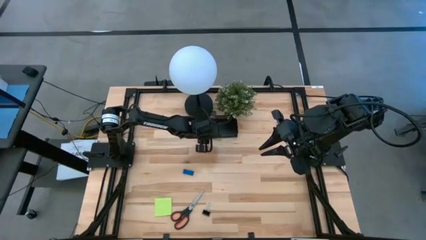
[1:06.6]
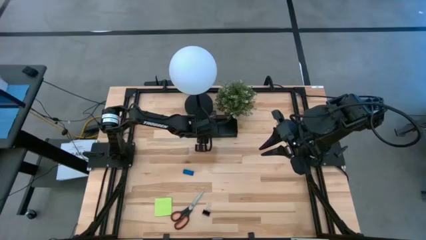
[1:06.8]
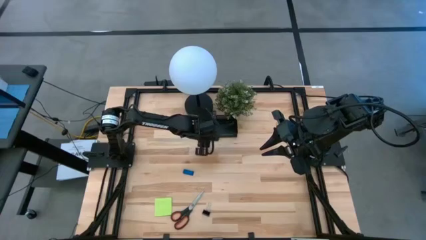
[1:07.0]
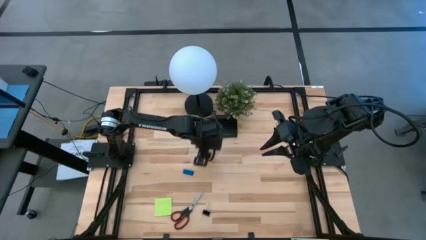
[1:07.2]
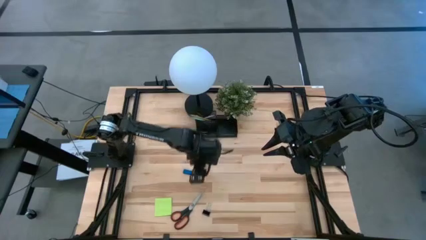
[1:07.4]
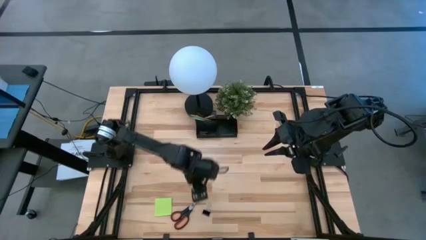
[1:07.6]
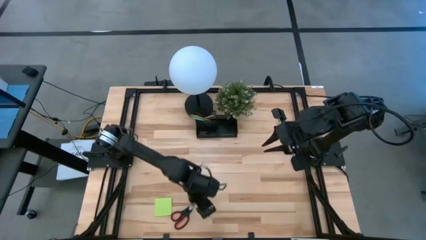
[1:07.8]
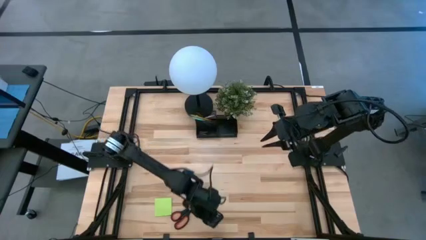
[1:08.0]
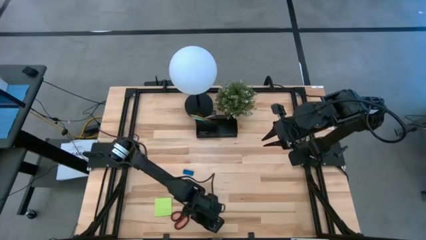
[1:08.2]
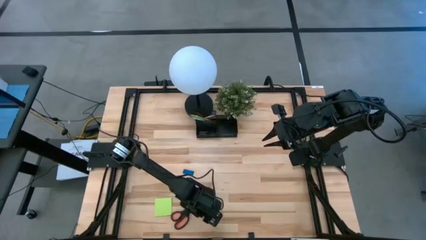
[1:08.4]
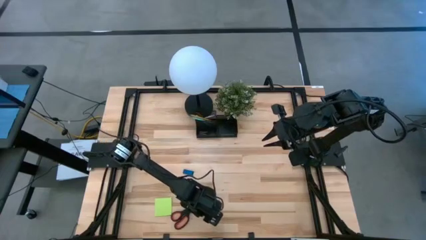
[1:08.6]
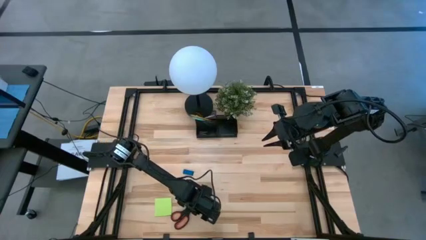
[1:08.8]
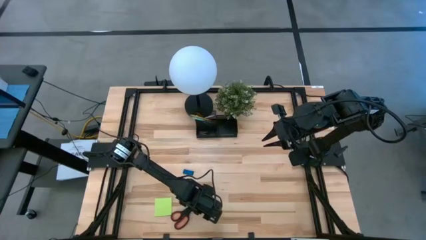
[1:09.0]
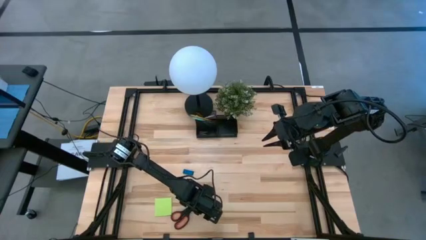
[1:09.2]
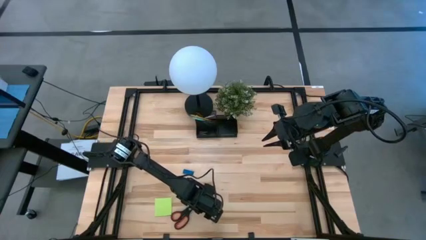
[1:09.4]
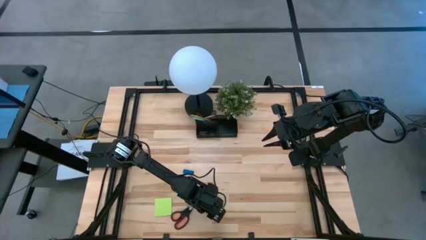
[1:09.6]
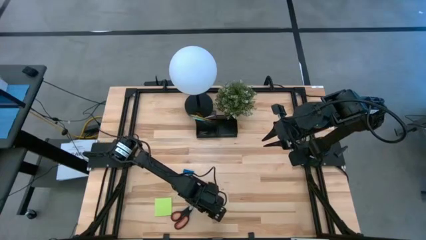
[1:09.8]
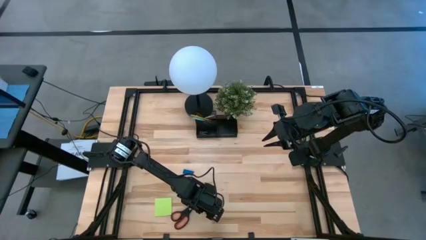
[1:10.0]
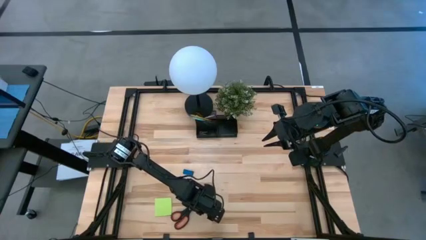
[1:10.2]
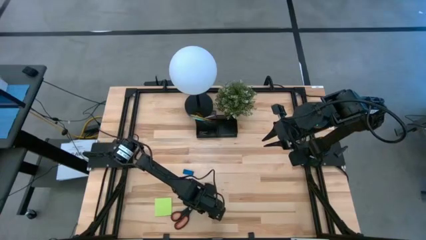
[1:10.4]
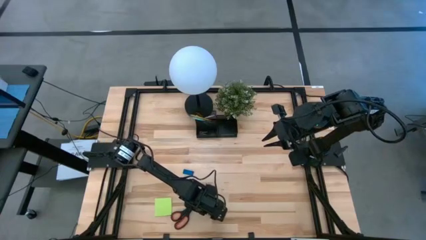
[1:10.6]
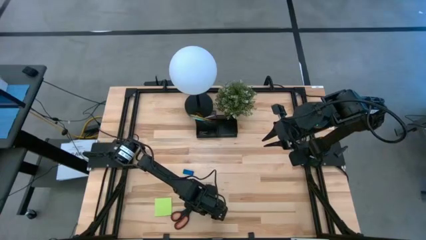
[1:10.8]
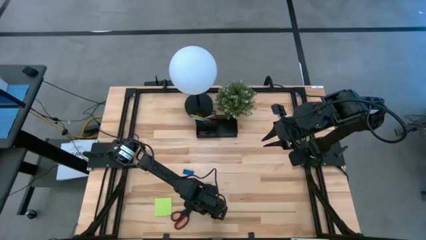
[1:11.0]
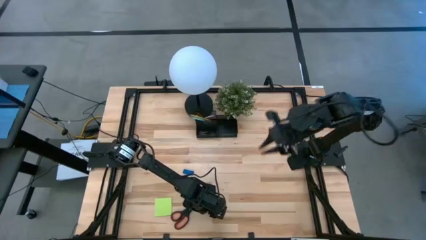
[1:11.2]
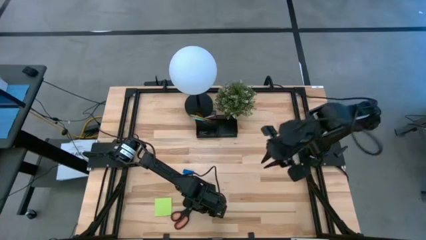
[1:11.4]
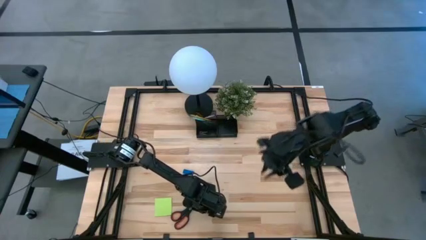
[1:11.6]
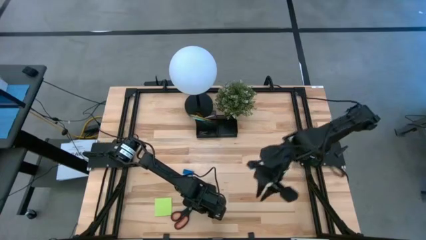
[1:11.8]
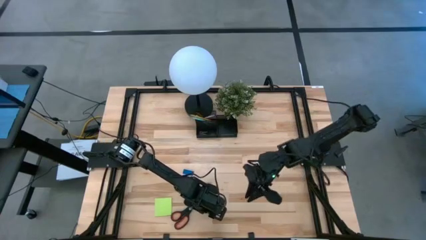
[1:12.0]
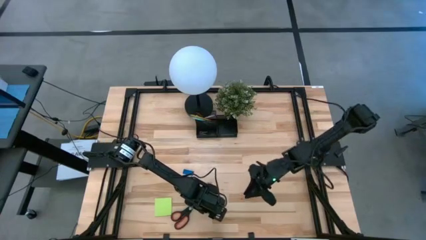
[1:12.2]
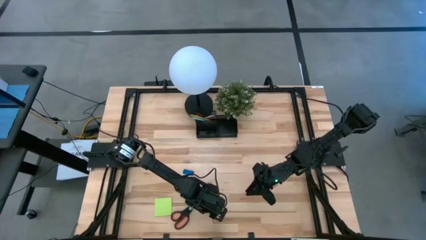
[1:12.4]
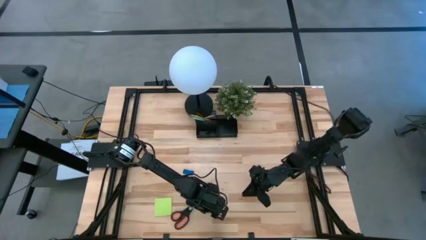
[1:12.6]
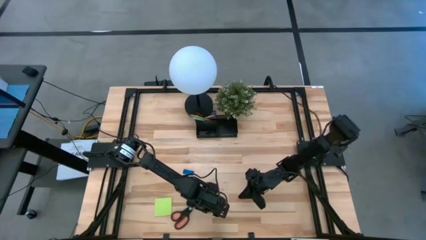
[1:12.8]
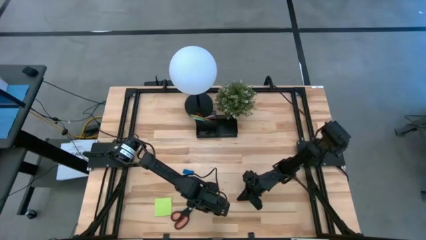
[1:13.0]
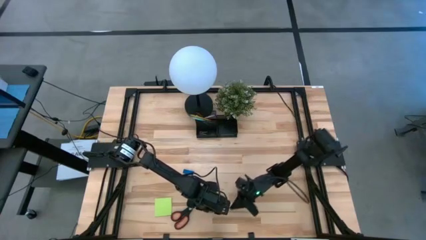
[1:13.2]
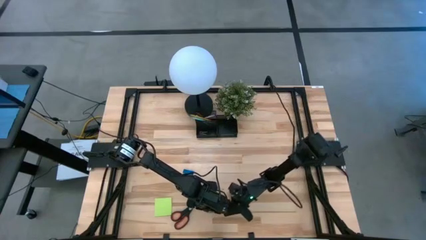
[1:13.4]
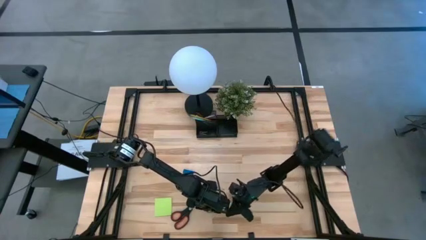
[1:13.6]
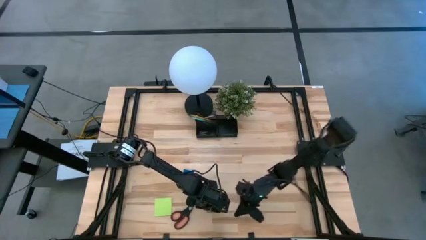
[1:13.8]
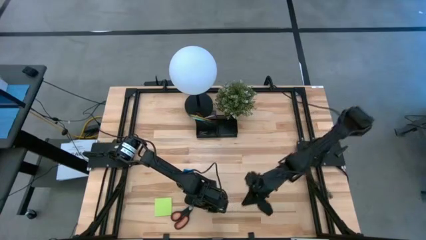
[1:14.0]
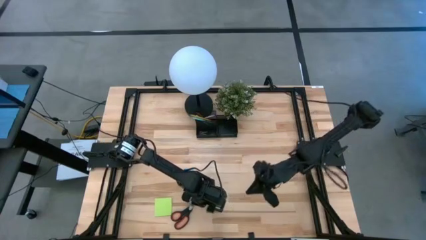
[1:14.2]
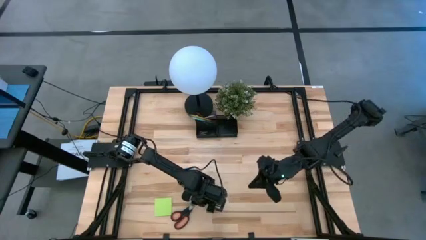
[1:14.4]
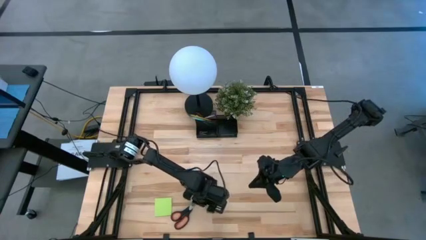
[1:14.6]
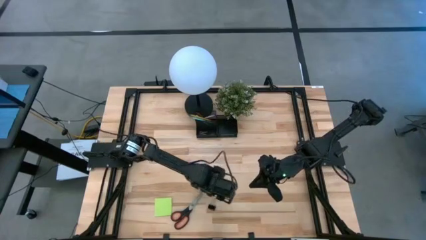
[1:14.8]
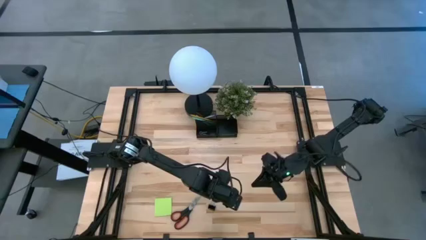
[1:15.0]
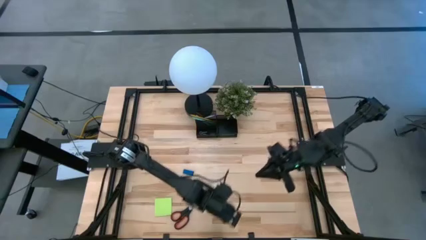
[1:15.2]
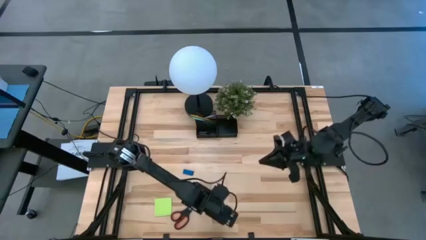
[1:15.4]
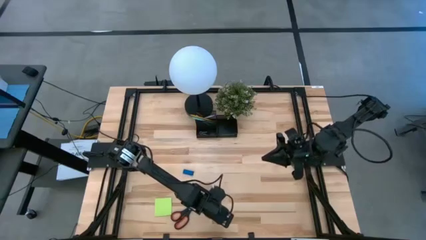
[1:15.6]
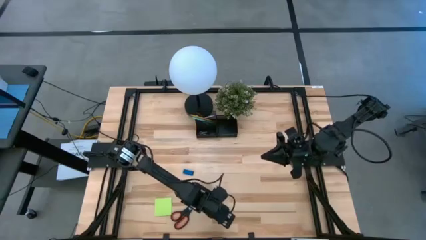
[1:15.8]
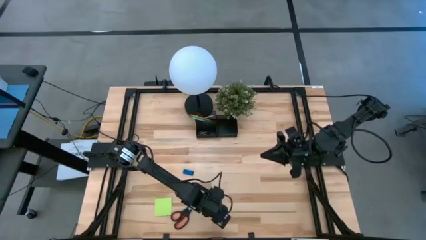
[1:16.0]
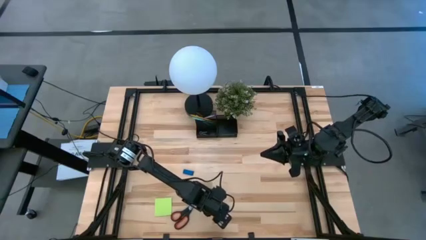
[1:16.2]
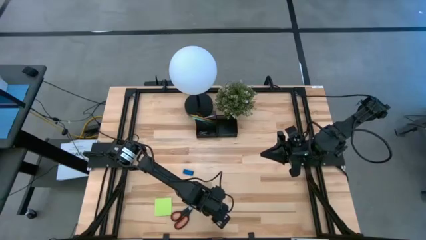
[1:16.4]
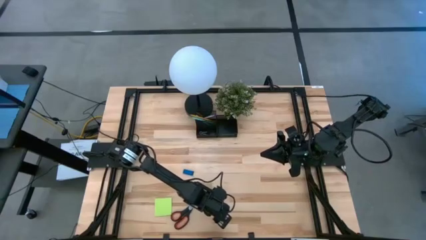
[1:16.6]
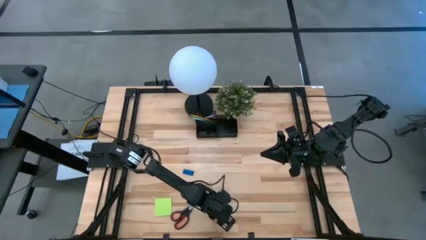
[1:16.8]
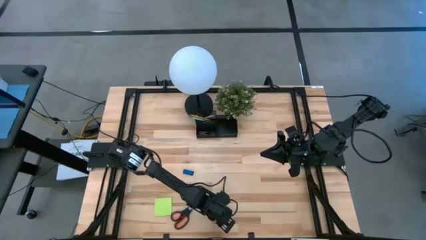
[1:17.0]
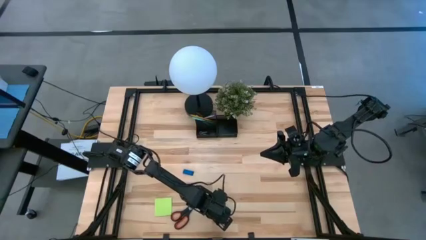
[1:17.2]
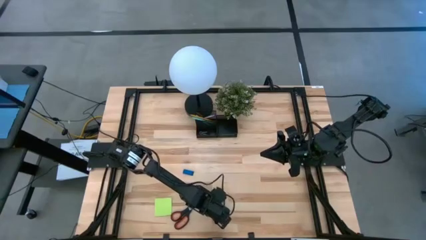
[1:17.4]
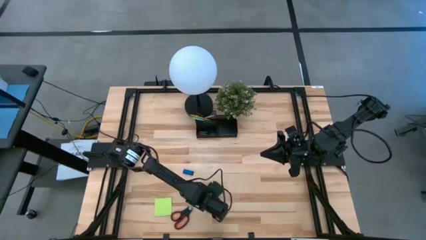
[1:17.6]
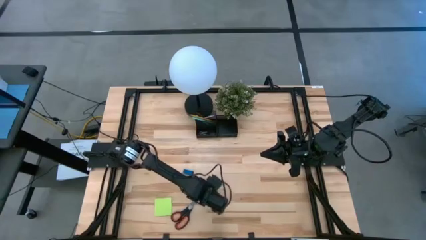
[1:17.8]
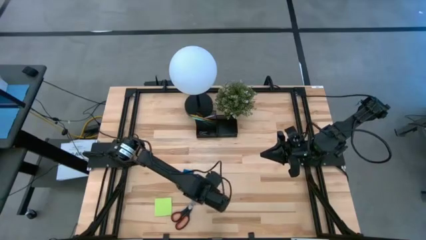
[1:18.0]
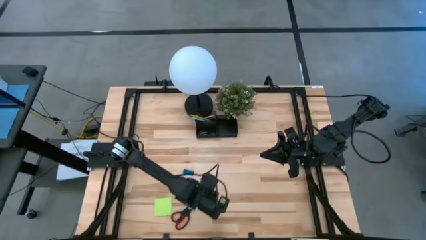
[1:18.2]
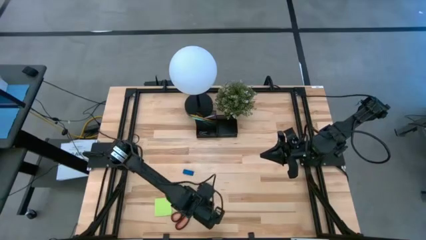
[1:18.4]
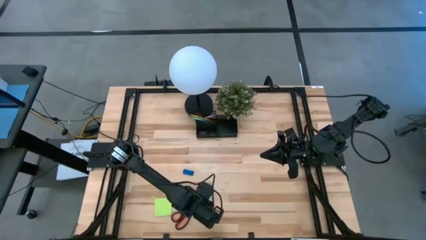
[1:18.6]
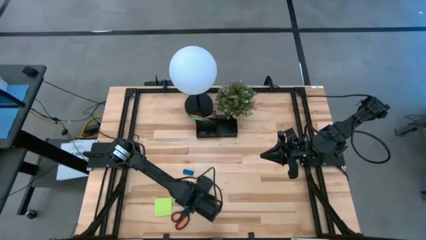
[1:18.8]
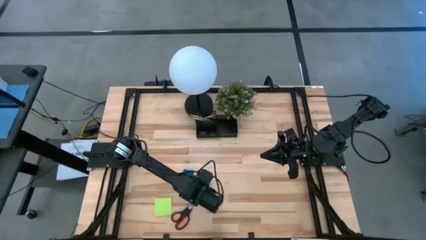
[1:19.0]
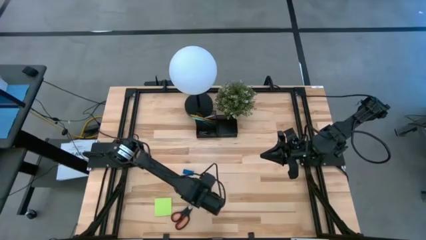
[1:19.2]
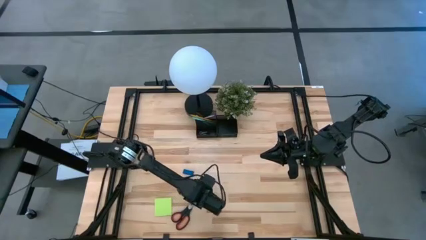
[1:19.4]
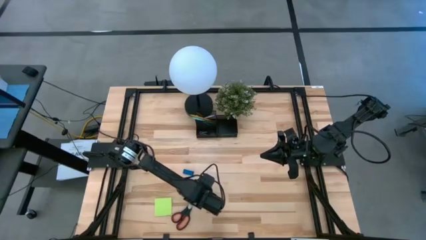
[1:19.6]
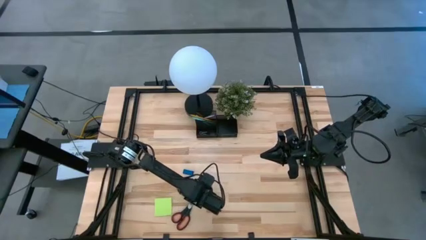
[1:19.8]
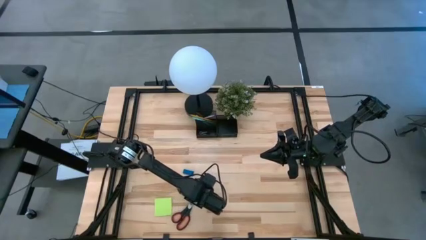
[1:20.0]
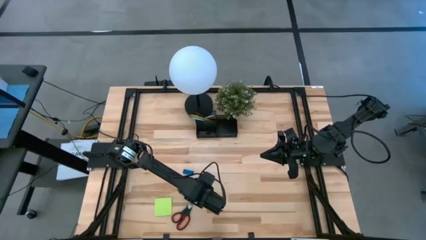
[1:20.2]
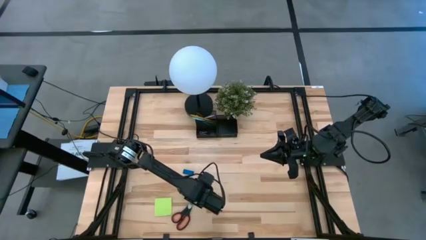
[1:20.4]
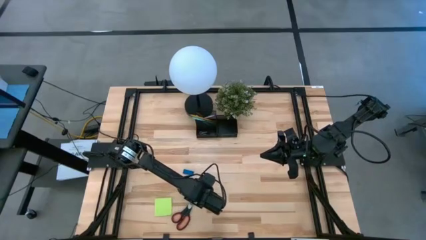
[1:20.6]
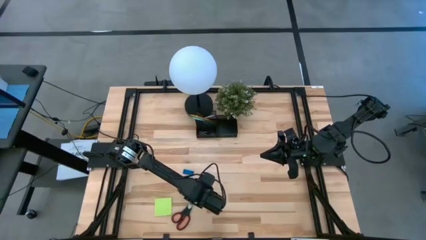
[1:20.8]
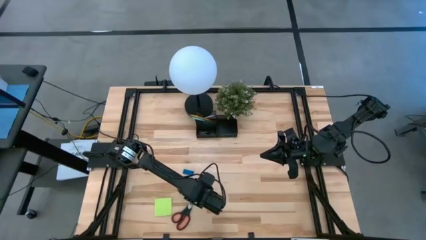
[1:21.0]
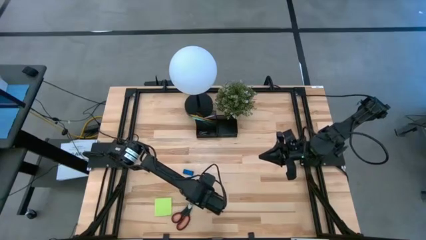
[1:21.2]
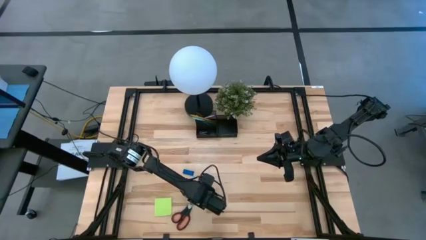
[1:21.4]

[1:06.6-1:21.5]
Task: Pick and place office supplies into organizer
Put the black binder clip into the black desk organizer

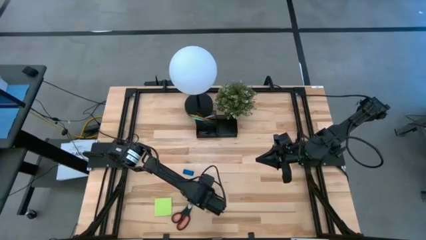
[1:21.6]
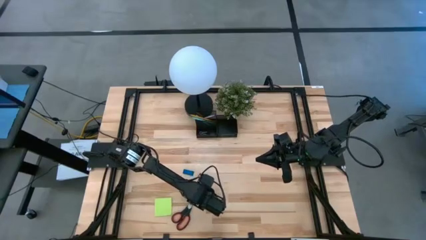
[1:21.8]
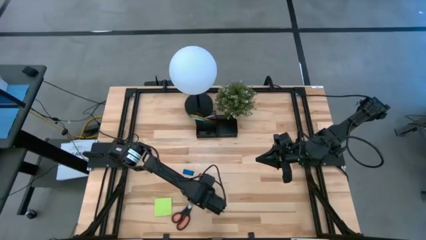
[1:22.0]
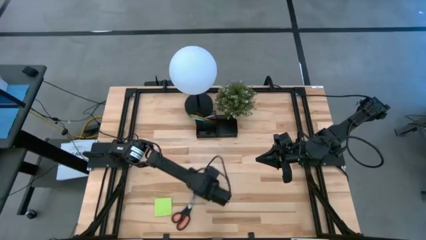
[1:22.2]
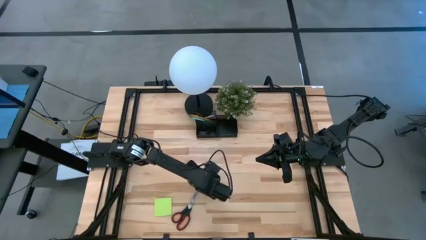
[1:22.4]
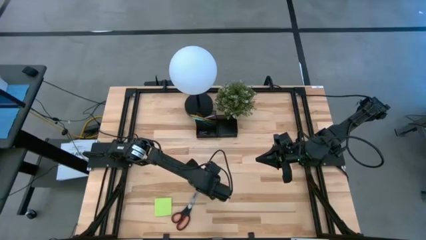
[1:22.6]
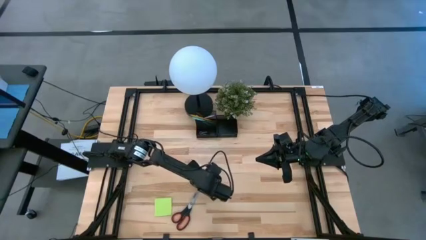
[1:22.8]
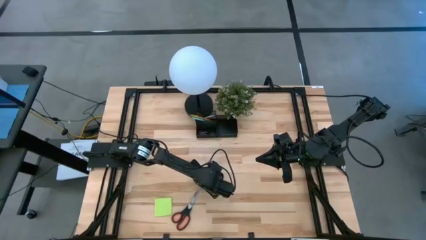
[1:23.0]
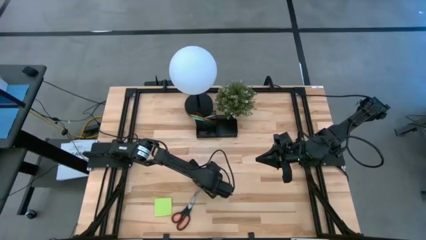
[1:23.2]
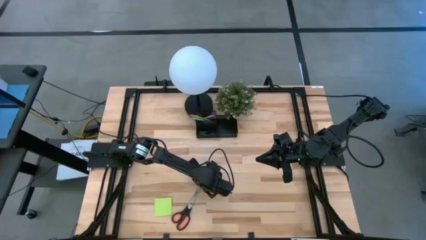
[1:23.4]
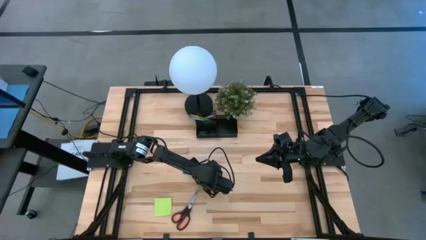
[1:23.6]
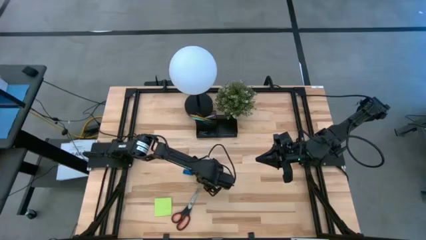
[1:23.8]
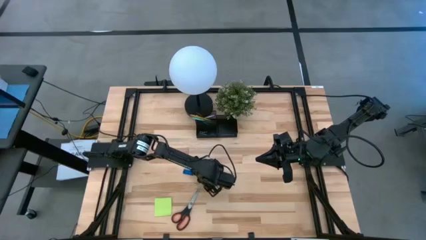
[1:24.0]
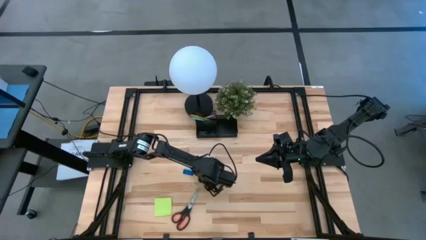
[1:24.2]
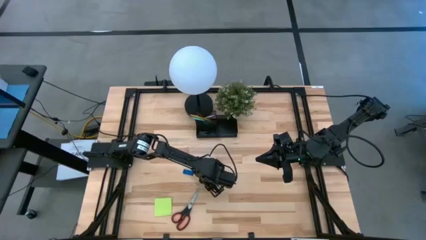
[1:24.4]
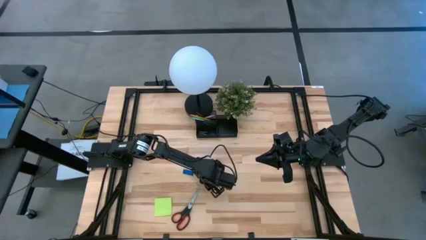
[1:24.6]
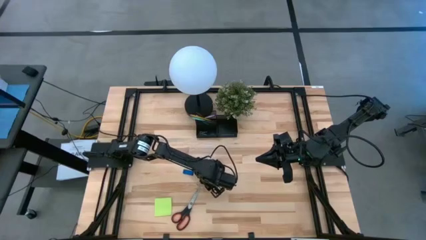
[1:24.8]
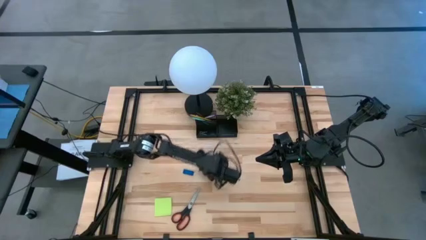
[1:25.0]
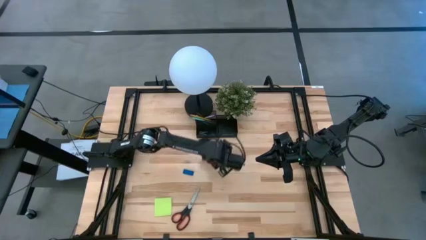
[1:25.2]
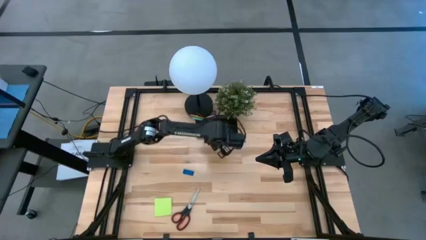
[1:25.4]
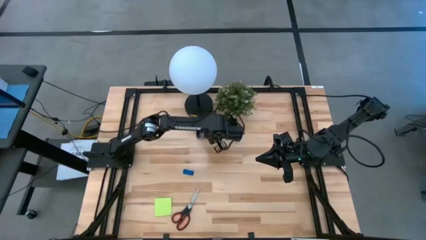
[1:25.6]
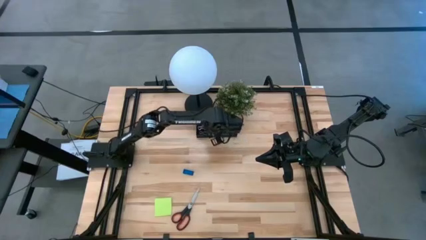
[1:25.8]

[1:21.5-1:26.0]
Put the black binder clip into the black desk organizer
